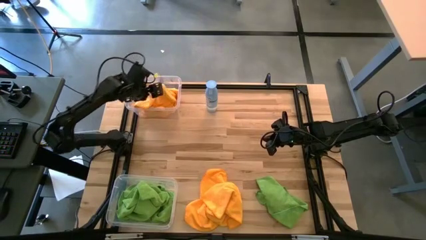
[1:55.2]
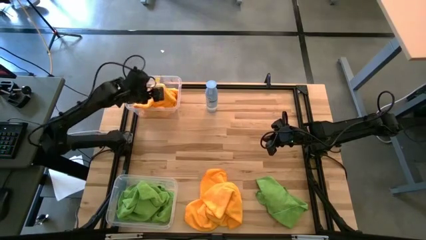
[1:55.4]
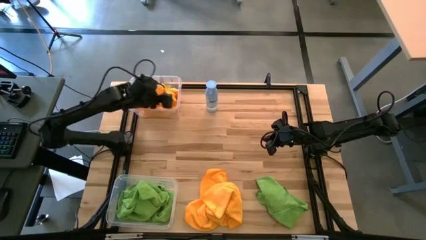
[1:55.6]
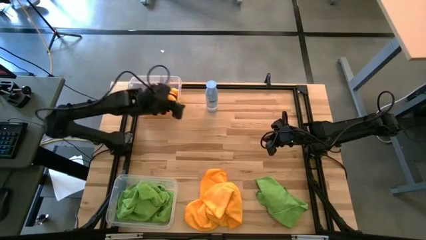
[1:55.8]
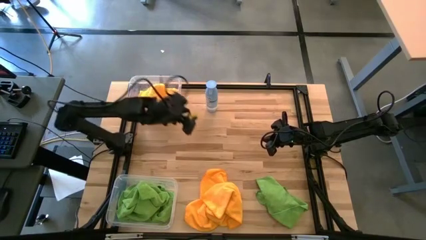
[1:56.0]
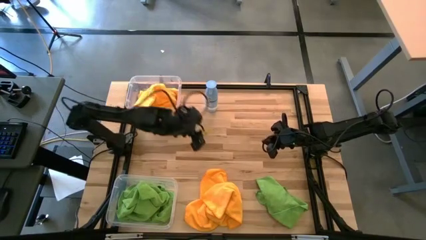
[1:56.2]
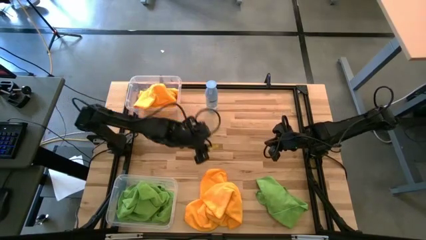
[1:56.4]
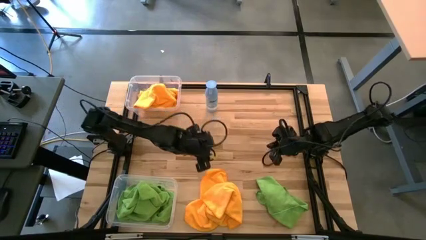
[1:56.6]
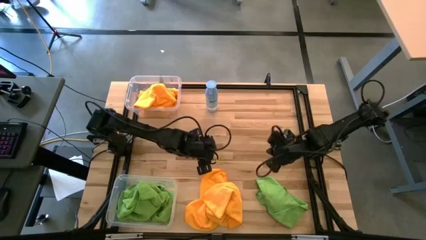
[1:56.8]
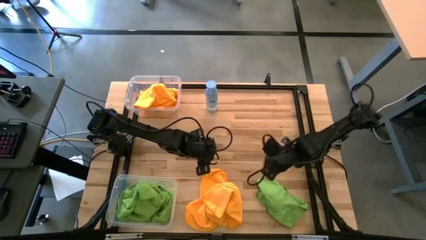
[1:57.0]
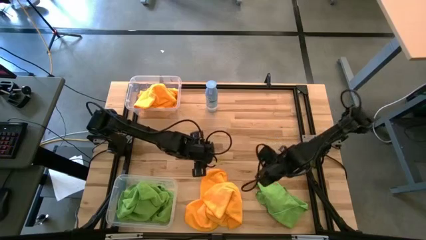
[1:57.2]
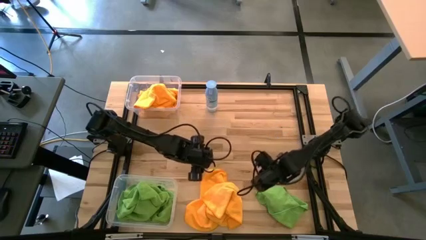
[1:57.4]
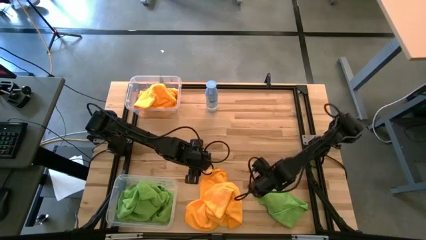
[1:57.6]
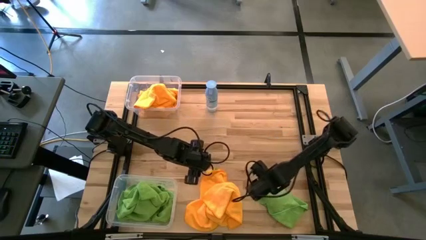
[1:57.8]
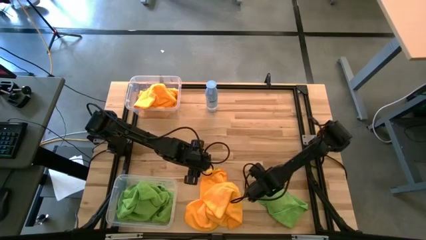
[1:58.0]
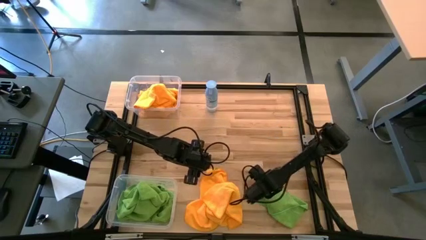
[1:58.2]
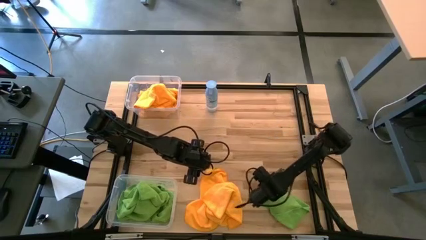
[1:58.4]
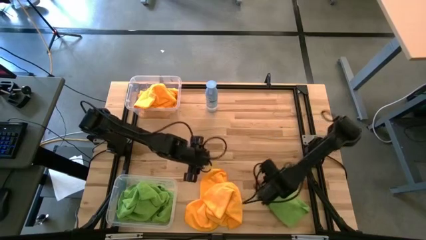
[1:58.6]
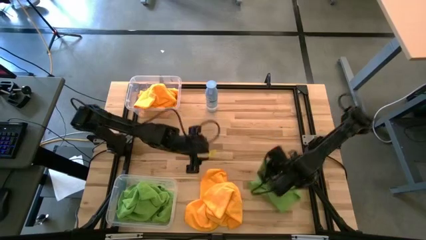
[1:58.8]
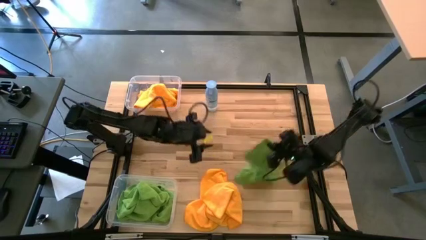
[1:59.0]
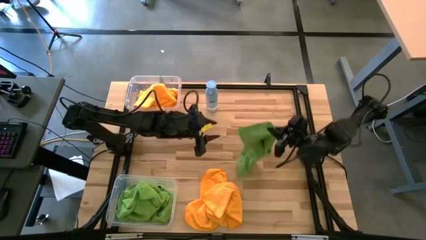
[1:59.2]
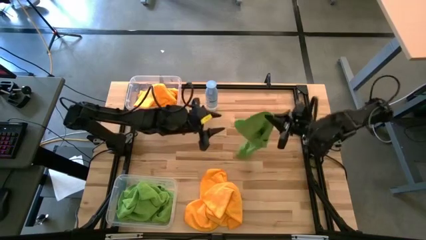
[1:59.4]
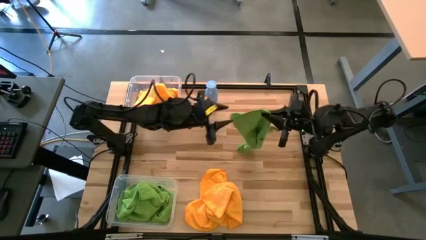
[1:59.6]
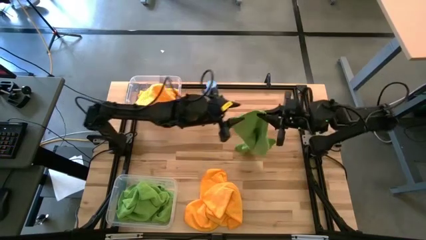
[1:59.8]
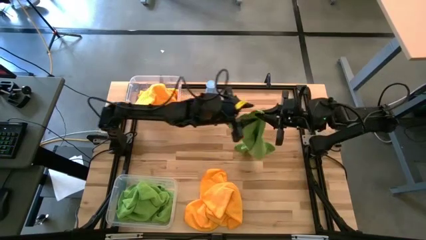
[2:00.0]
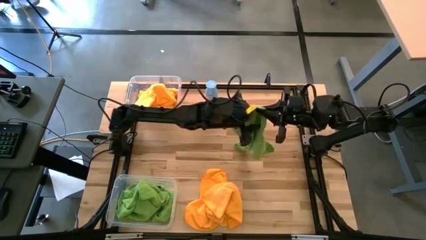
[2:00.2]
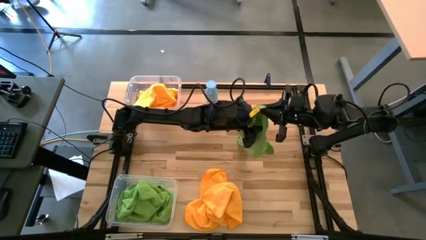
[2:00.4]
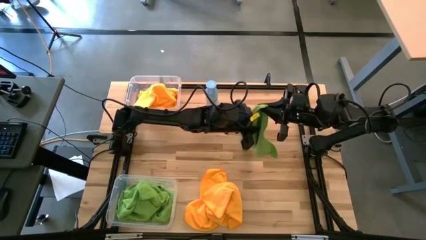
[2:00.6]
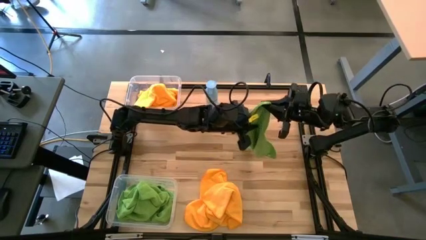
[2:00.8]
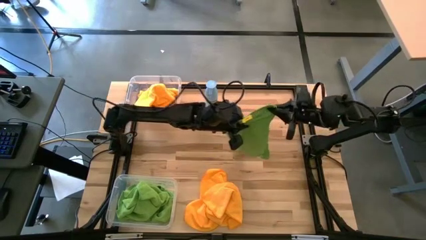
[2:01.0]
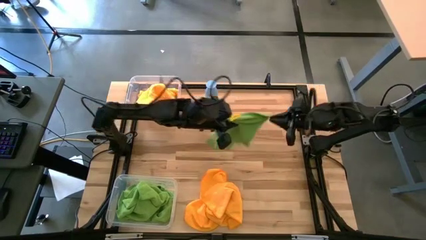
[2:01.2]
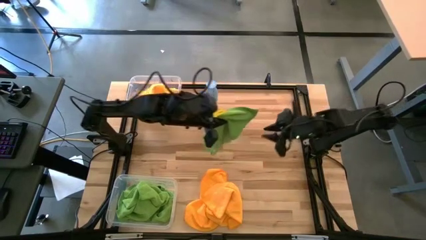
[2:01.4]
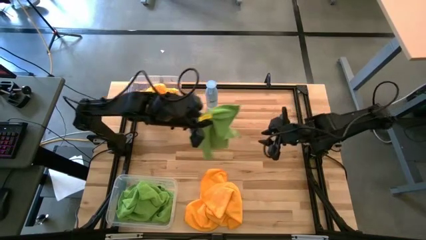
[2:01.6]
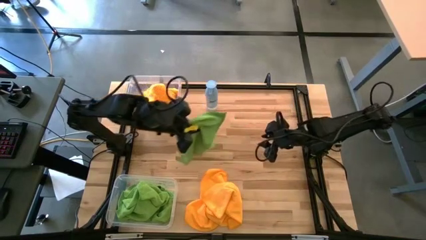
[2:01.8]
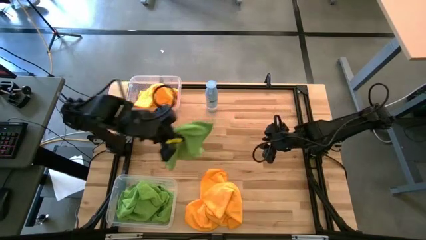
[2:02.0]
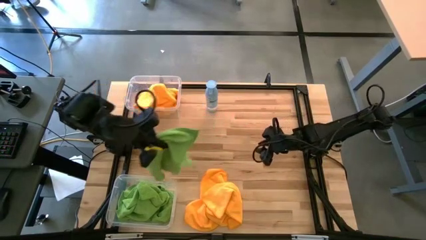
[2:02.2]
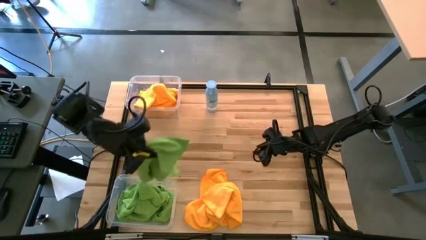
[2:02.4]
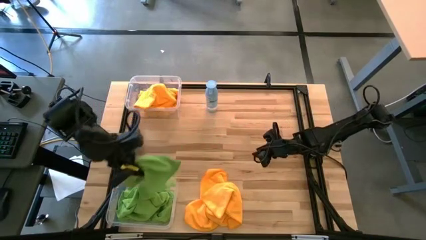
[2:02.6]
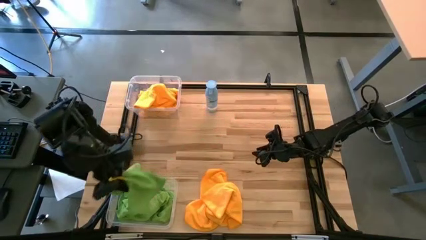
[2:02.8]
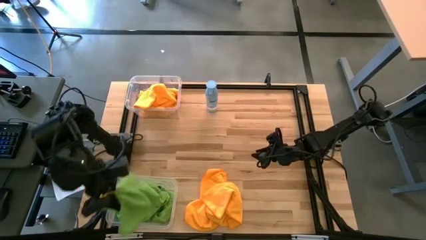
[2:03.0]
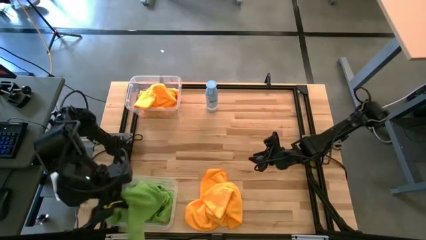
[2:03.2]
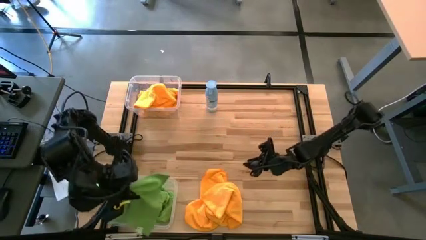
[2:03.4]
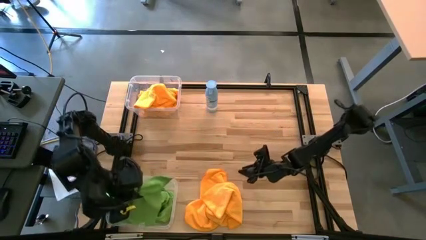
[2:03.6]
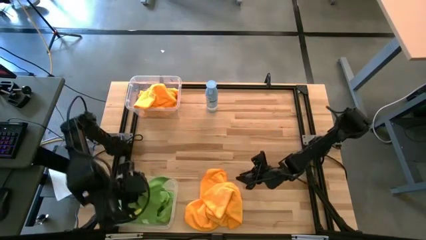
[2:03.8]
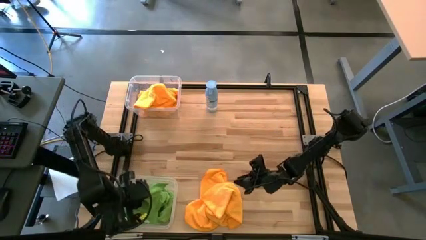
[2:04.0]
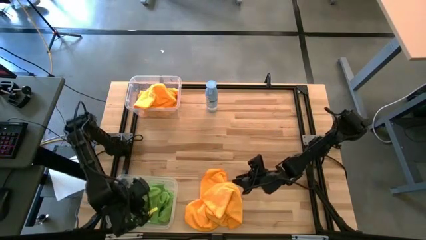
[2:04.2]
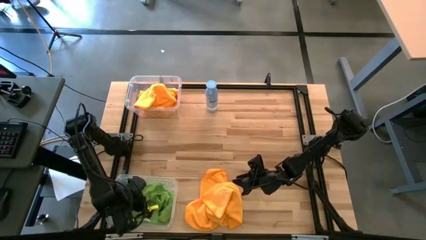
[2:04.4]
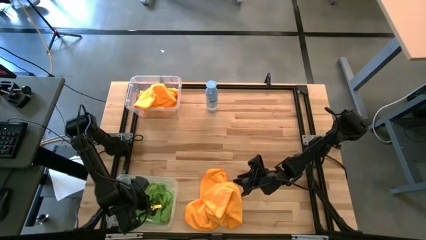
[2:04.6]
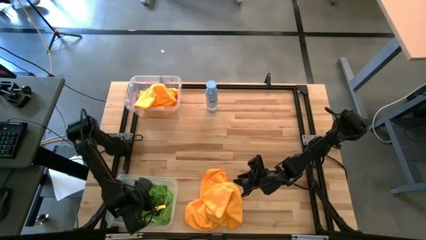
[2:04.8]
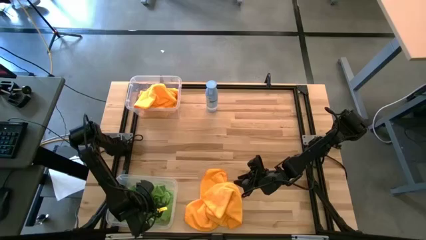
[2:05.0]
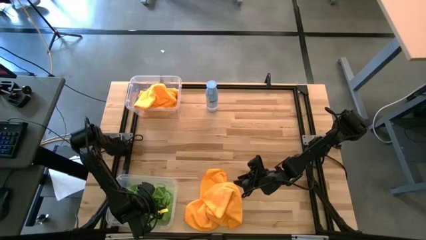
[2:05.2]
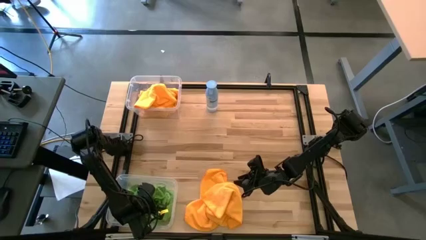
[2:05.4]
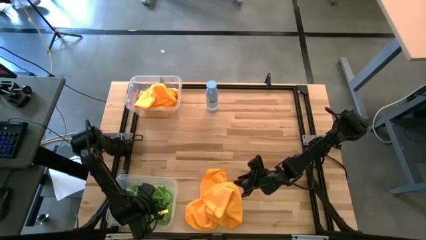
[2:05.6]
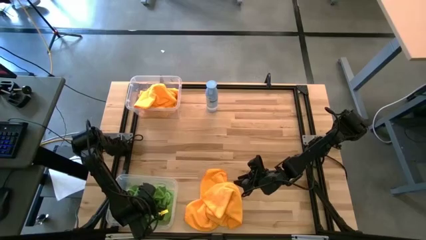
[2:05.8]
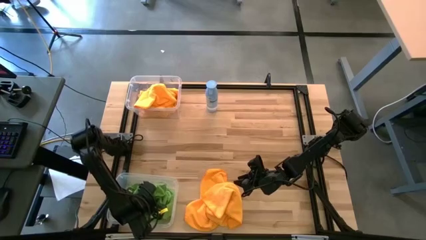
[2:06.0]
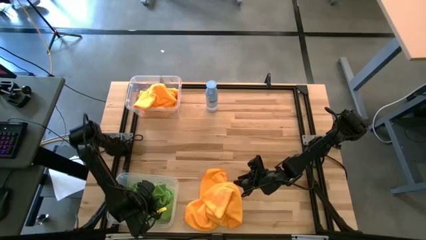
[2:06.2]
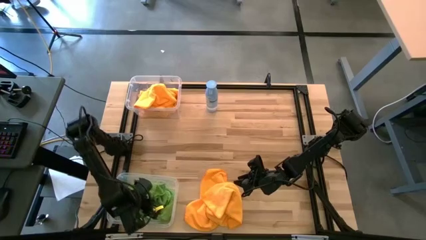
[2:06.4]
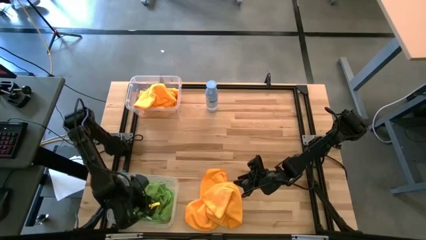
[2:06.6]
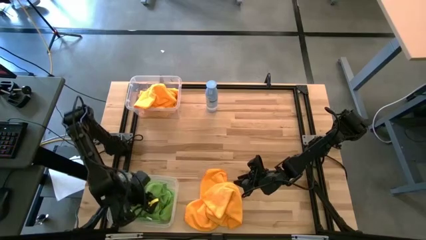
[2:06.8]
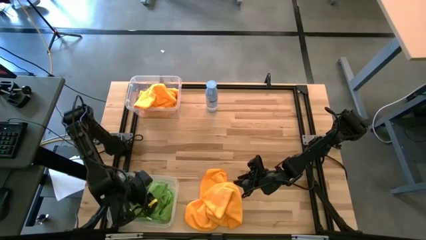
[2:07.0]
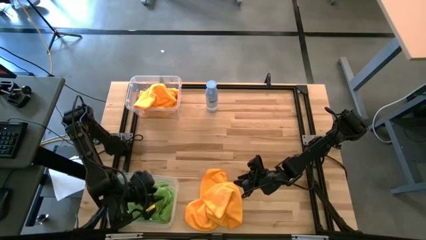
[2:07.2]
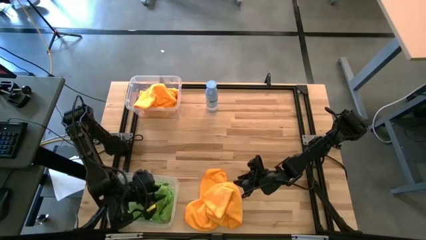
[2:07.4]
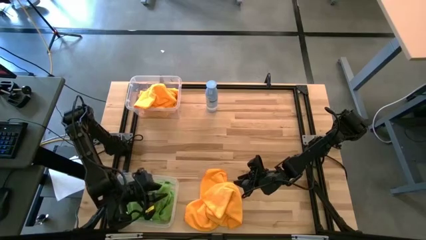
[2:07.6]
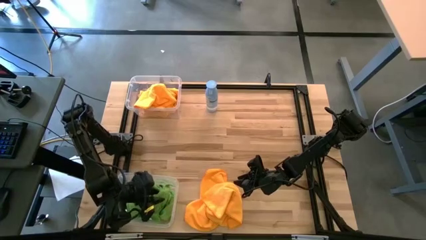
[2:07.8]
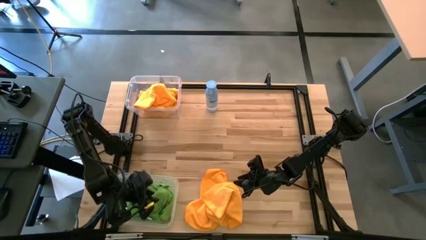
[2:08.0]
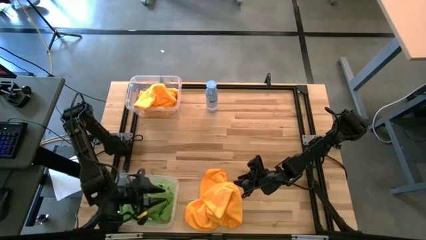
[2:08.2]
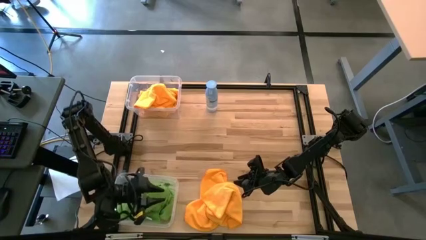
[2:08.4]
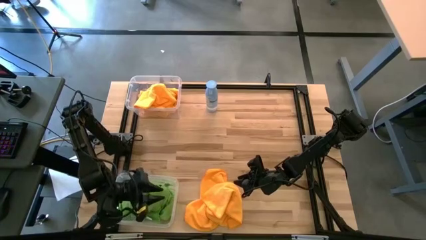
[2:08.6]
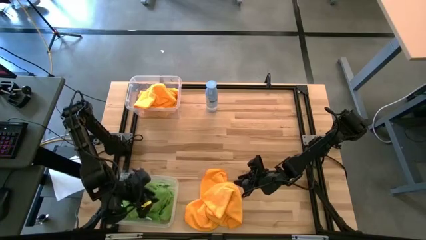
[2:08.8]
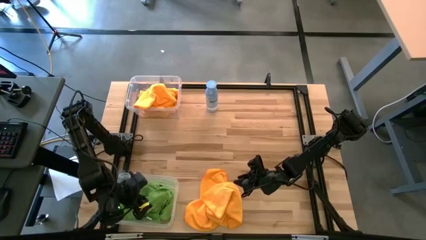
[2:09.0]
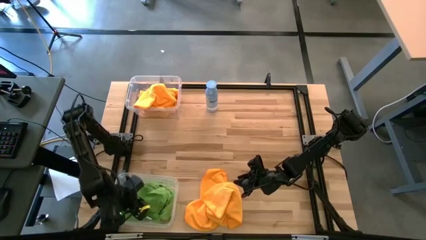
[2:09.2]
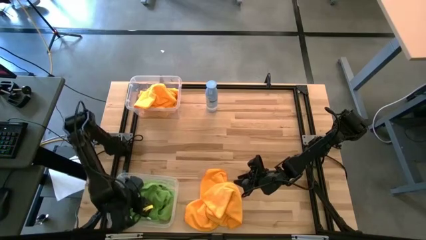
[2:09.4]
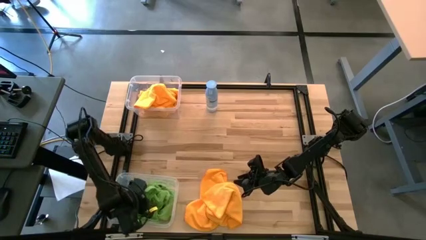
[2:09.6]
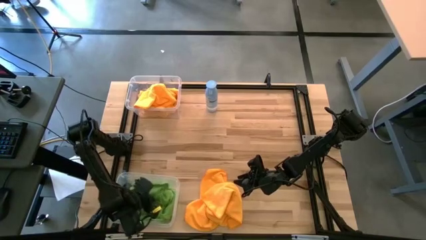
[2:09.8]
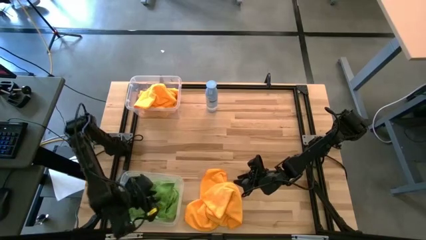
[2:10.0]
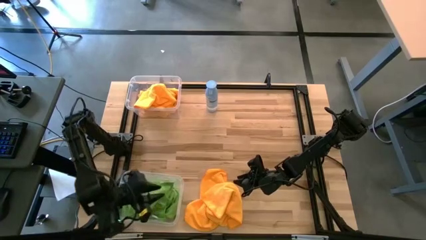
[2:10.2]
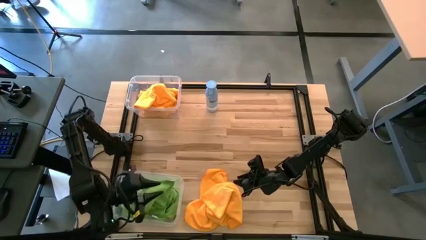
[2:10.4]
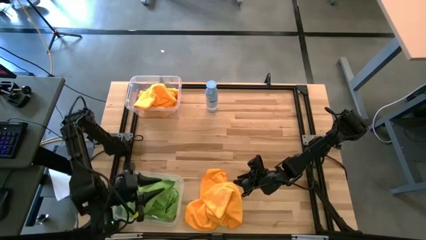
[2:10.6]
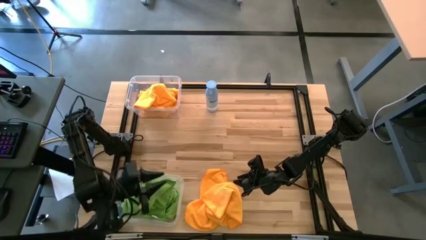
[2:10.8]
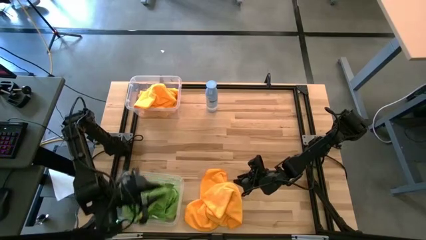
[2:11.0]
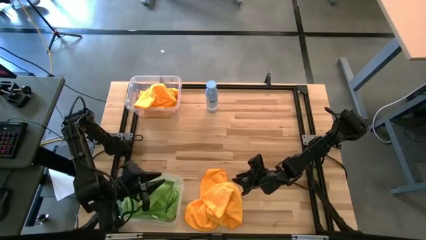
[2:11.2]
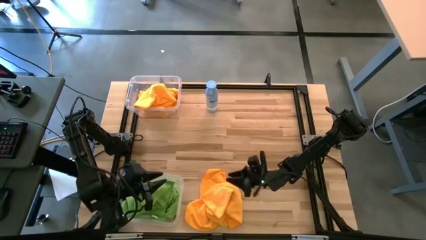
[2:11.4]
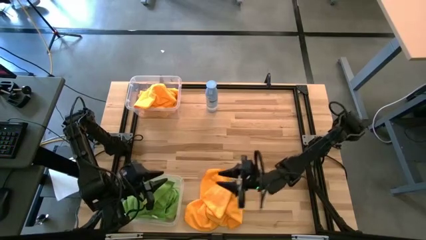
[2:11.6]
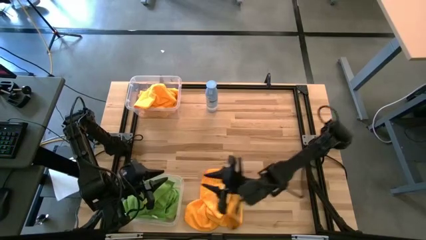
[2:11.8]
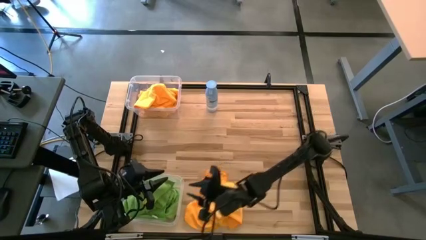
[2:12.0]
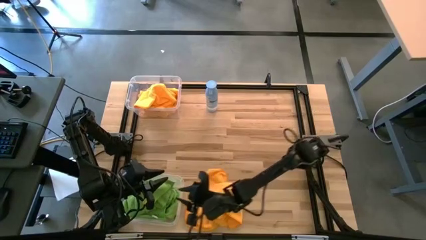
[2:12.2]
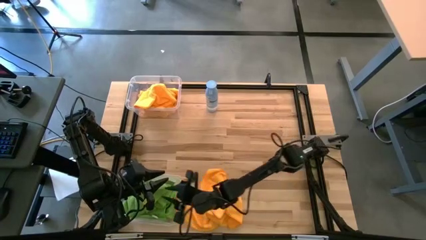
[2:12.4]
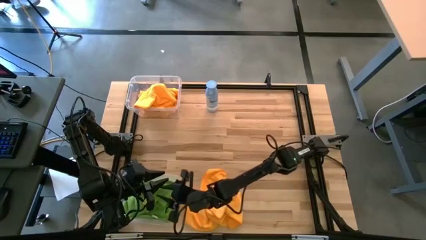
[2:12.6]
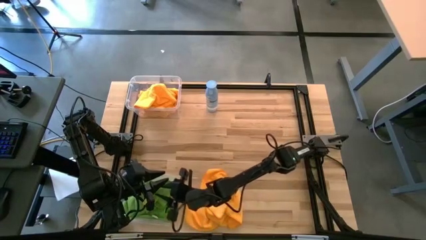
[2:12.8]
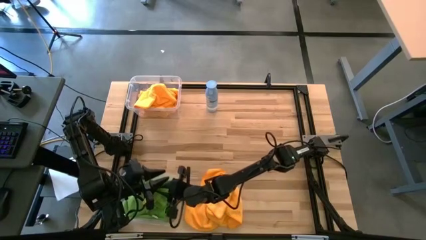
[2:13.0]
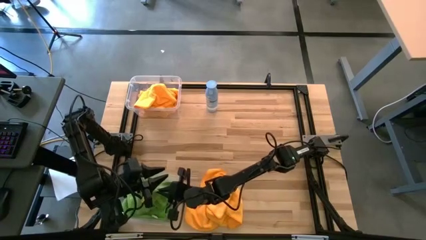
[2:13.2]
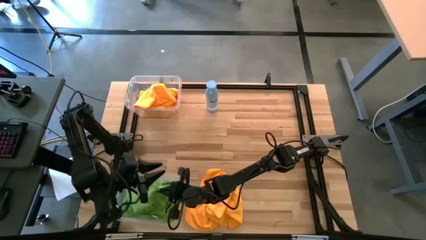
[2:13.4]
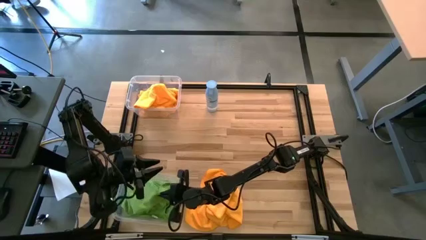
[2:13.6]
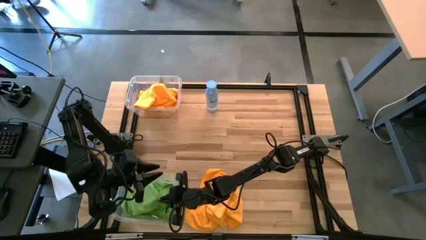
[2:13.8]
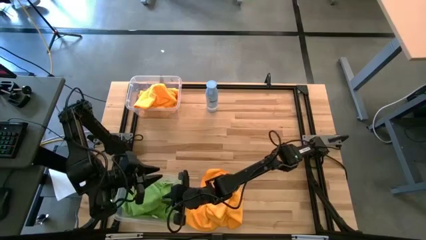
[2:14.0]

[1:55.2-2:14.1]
Task: Sort microfiber towel by color & place in baskets
Put the green microfiber towel into the bottom transparent bin
